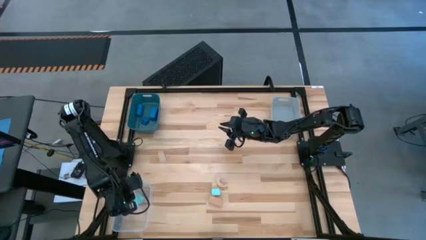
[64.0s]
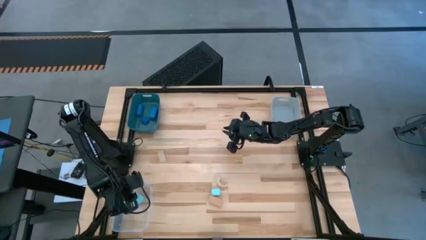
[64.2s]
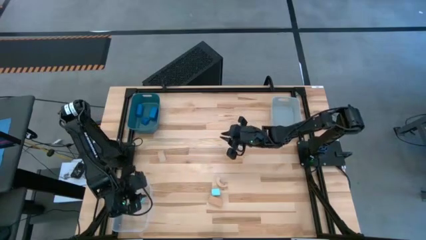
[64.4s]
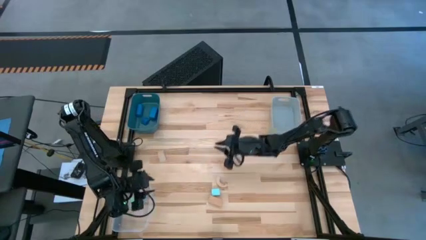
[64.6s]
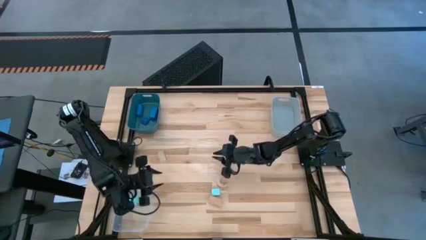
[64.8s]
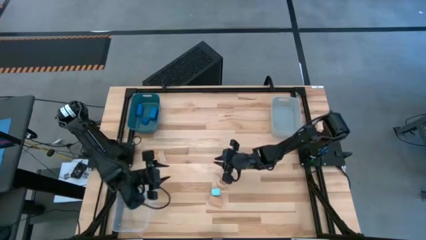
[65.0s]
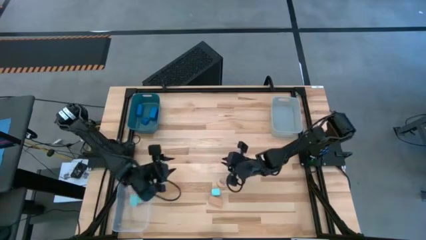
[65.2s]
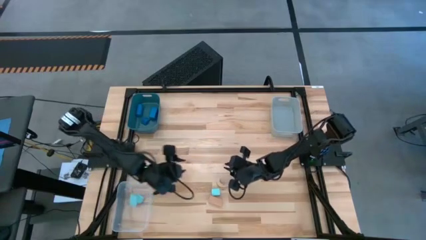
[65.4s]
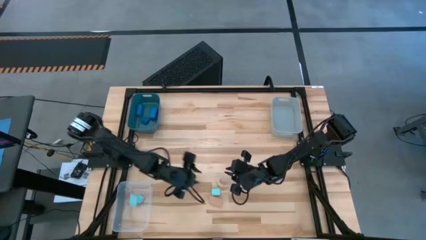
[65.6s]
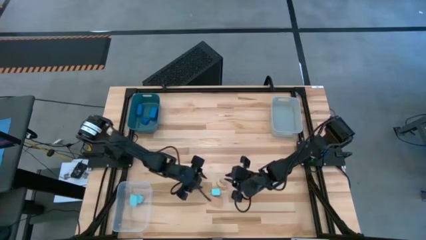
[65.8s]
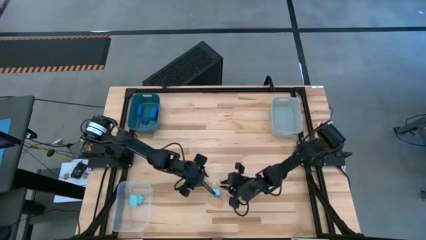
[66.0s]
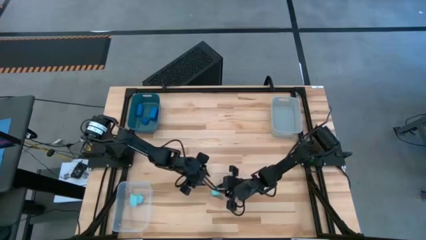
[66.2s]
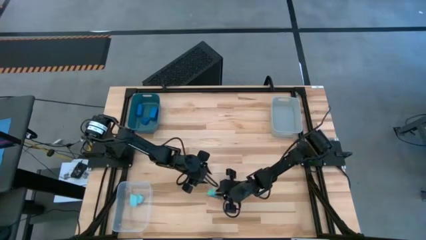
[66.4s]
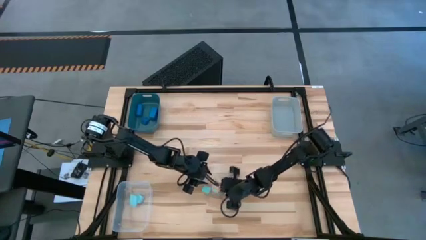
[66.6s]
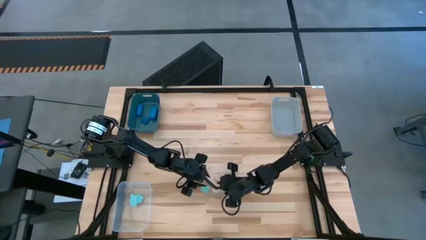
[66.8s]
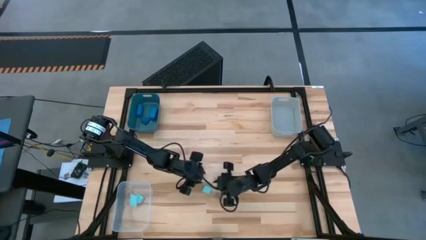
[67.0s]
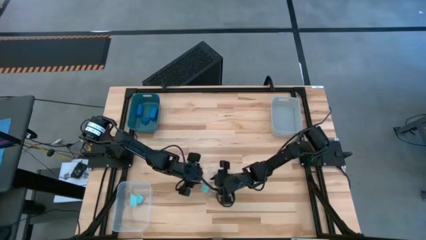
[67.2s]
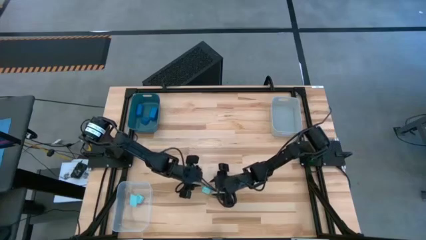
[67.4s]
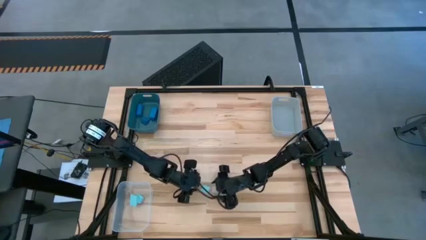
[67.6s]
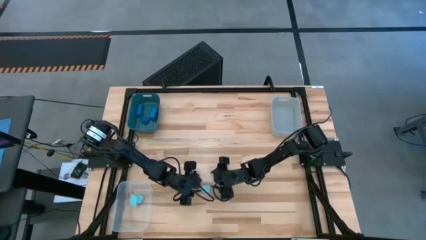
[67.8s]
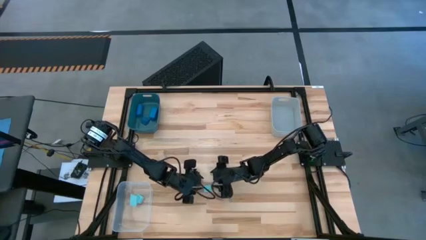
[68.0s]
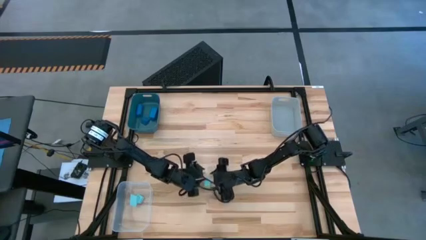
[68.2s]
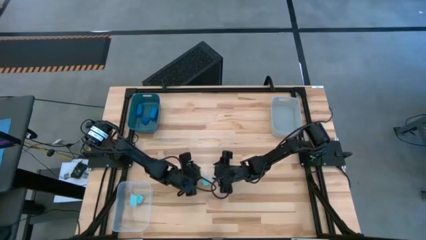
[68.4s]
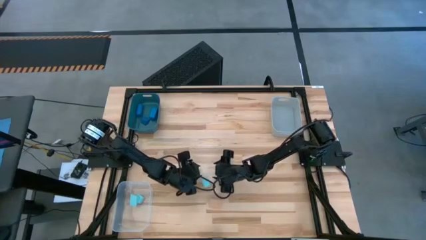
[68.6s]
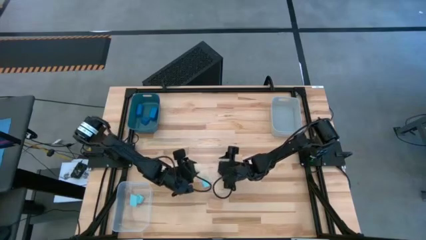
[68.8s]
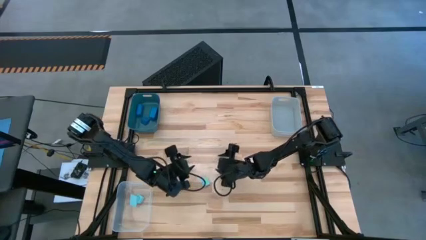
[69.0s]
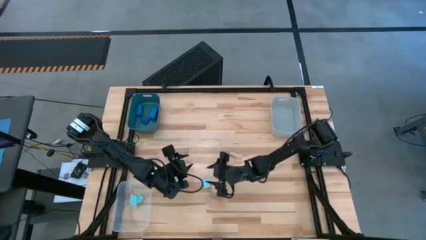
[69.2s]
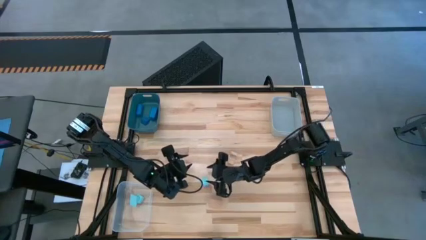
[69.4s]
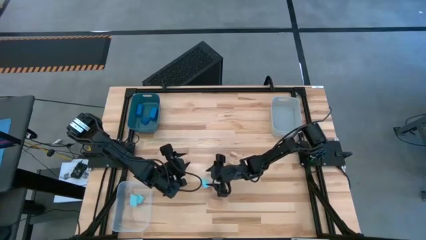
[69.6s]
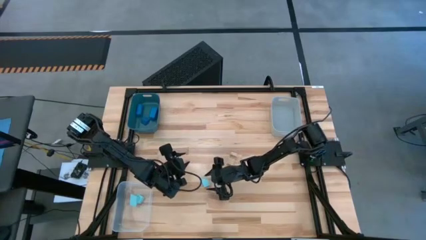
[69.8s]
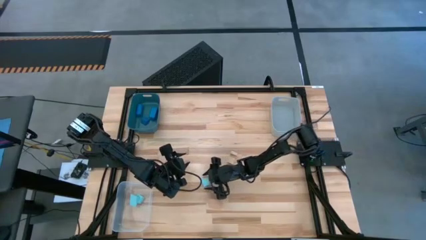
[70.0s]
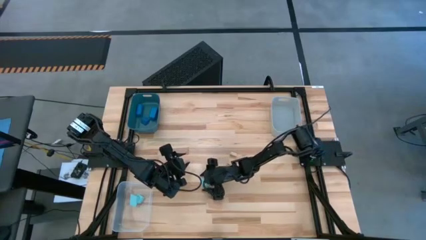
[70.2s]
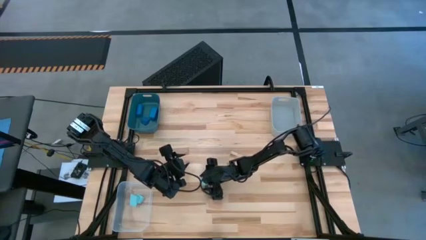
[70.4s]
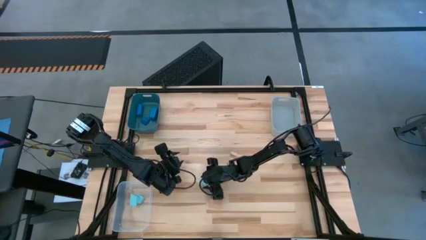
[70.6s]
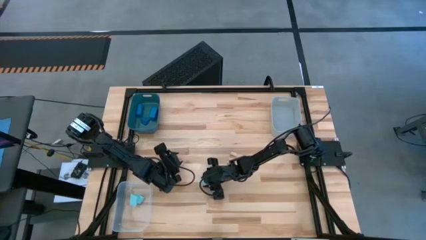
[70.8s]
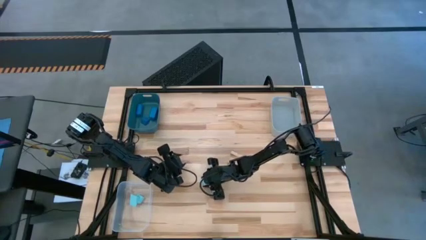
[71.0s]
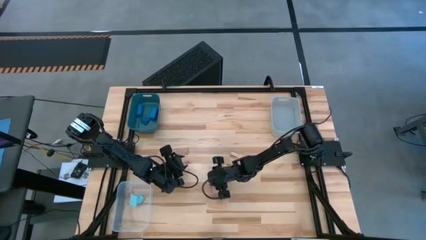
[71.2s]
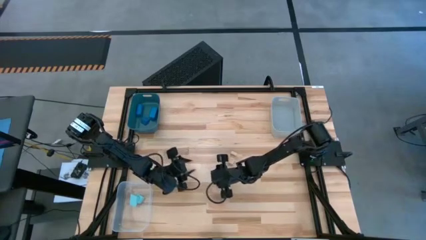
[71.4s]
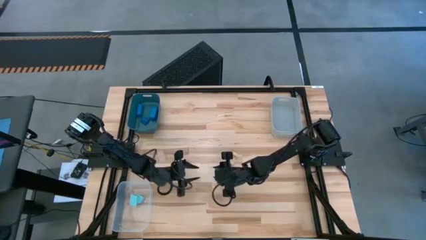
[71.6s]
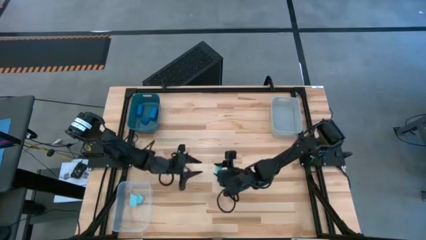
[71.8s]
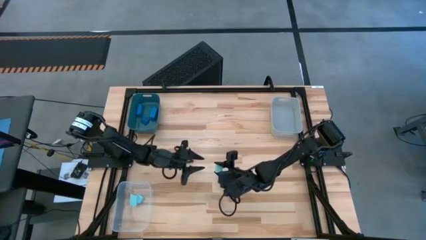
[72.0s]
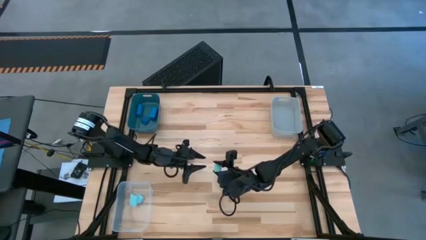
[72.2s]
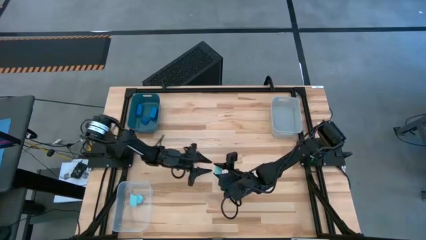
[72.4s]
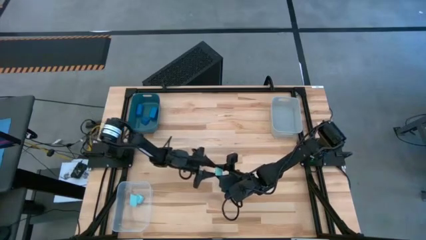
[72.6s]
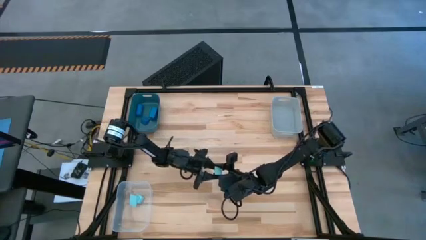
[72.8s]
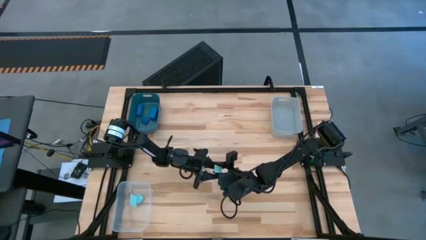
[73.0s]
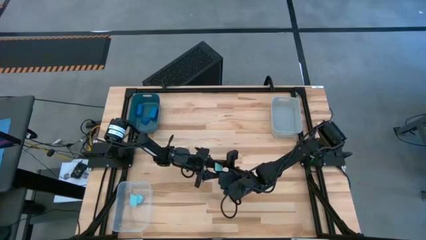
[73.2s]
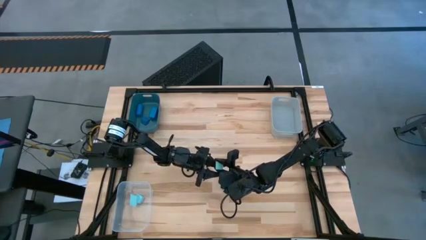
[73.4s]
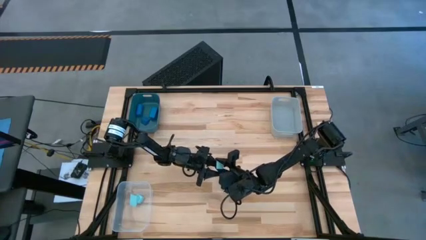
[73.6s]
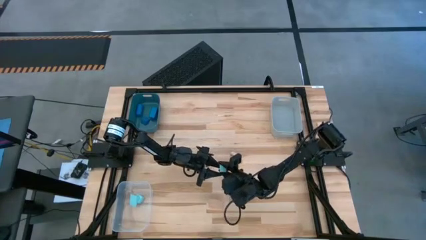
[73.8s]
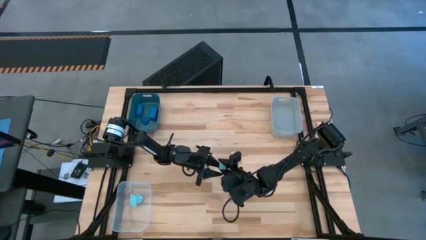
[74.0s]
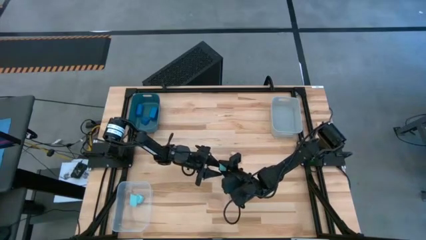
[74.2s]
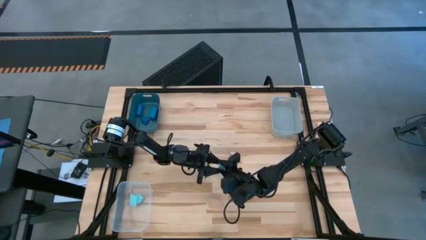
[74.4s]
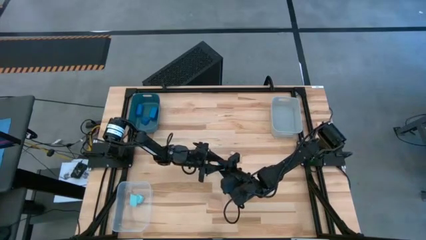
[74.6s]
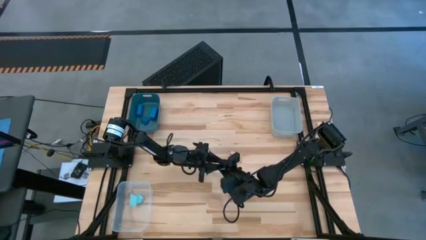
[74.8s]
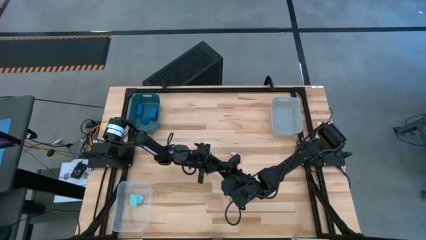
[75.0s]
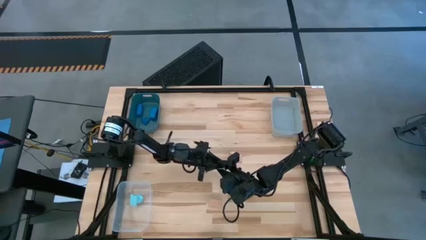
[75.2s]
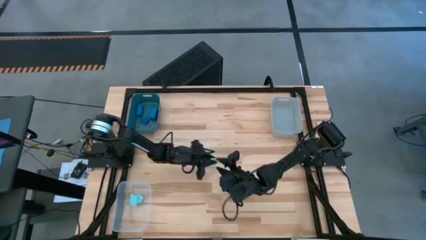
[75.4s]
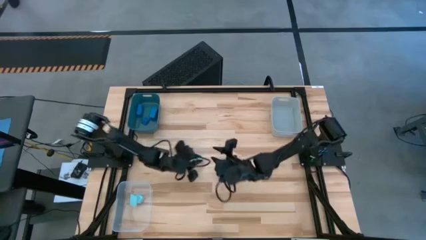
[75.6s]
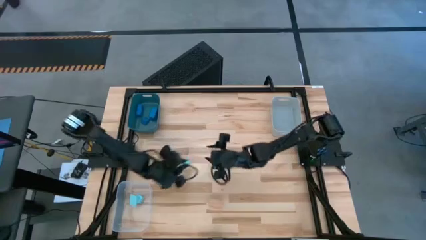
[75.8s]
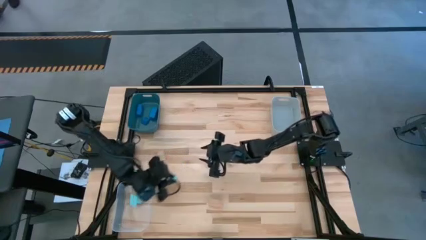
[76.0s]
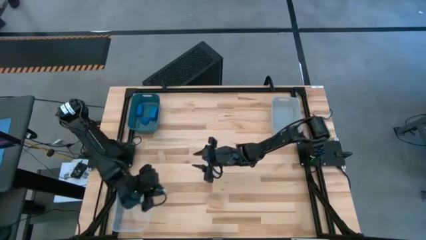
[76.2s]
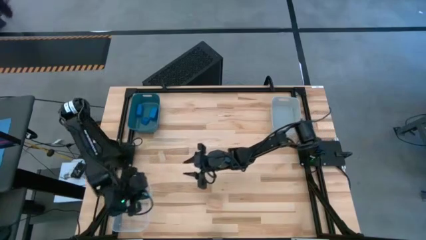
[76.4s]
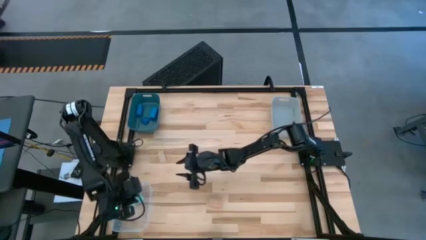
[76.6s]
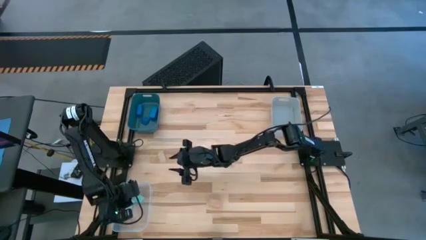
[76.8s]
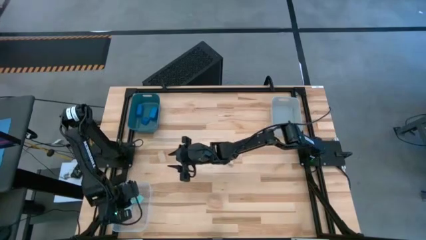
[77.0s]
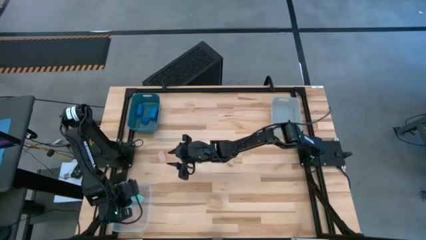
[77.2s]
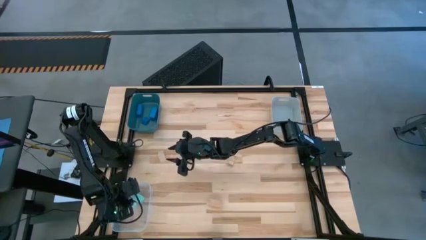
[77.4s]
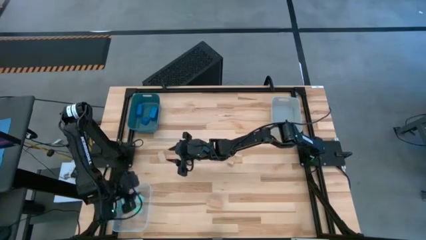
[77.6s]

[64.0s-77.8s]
Task: Sort & place blocks by color
Put the light blue block into the transparent bin

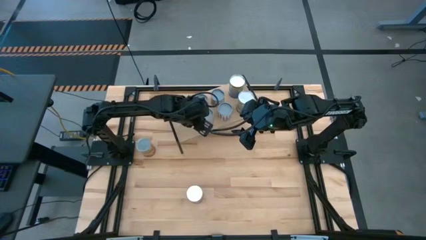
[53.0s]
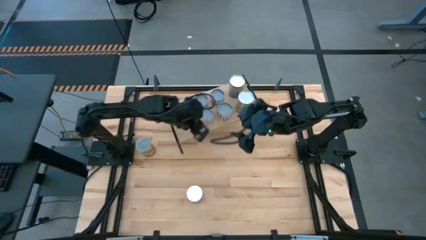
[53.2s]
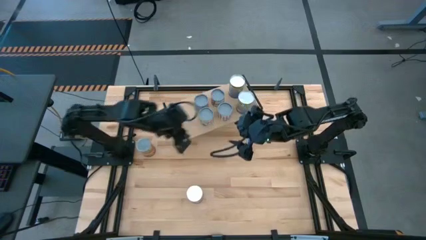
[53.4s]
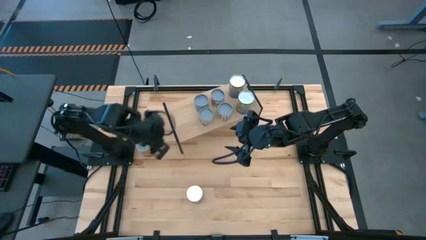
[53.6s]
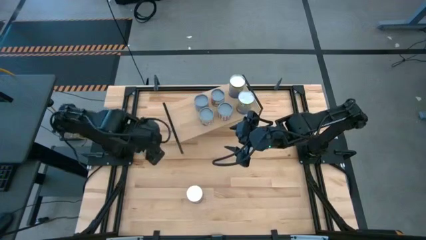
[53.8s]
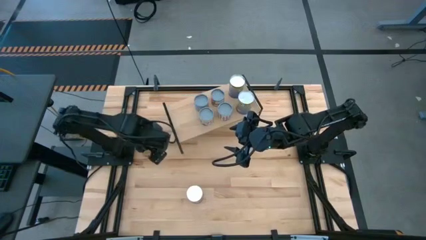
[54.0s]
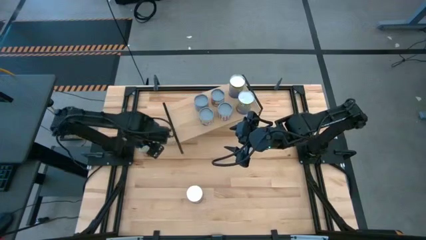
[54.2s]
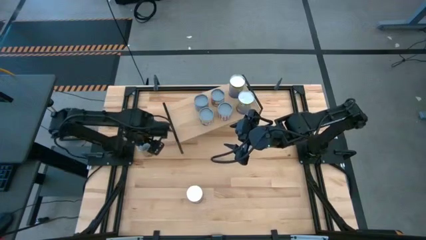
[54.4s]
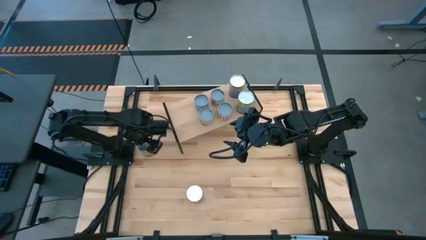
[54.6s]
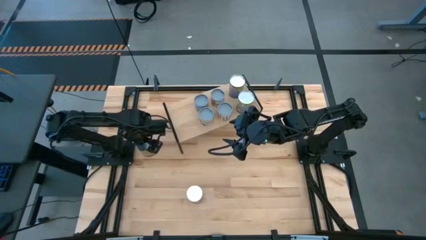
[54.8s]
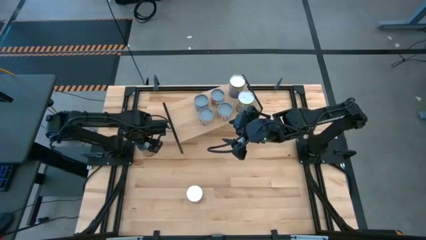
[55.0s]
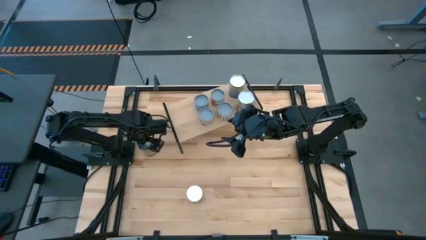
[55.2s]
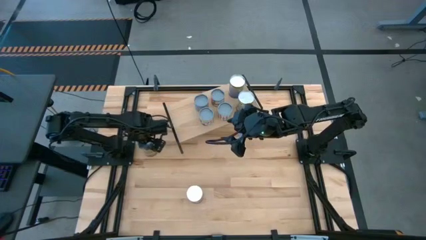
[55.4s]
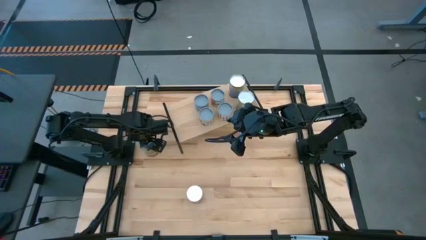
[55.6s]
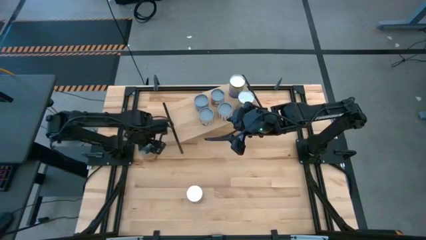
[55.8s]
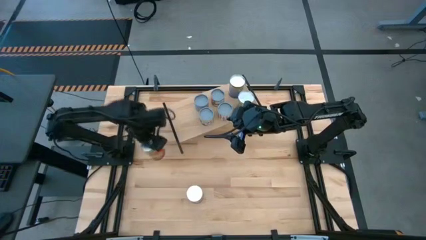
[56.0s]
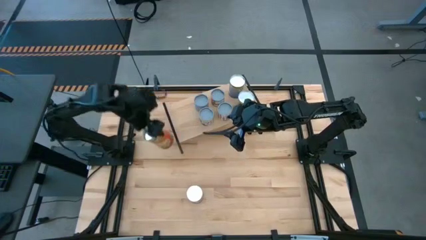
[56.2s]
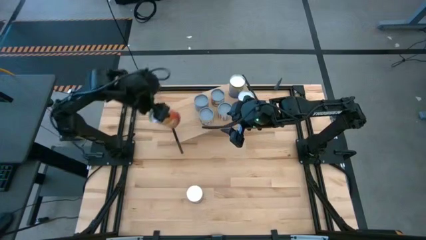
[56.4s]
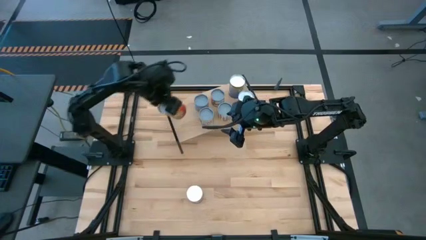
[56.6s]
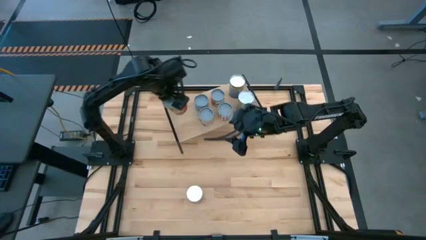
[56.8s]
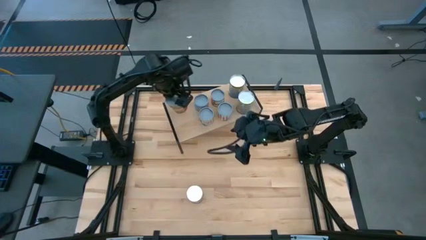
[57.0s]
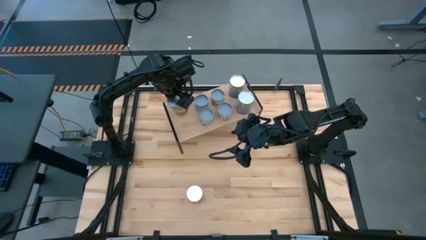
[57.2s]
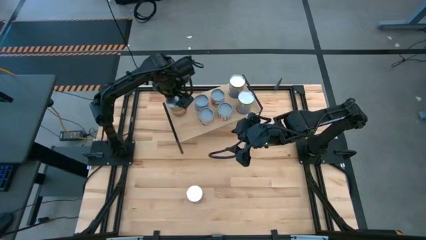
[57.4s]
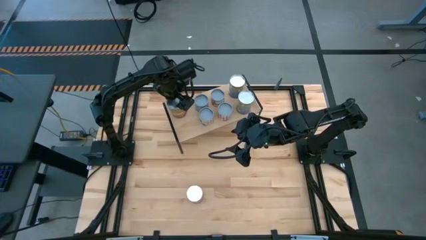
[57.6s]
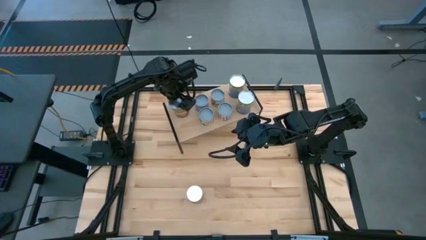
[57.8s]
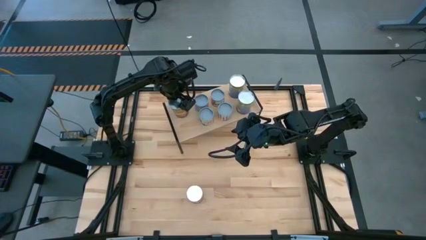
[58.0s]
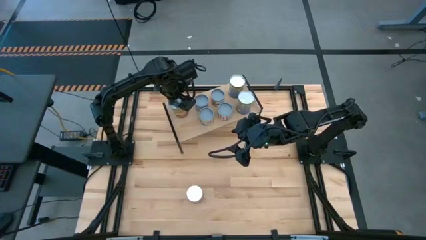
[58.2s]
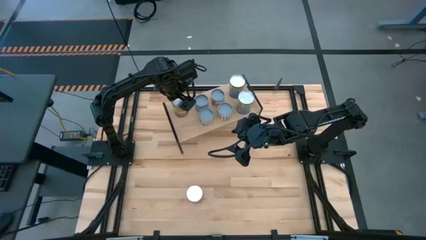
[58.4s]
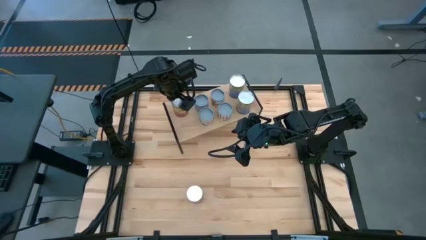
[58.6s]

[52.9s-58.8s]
Task: Pick and place cans onto a shelf
Put the top canned corn on the shelf
